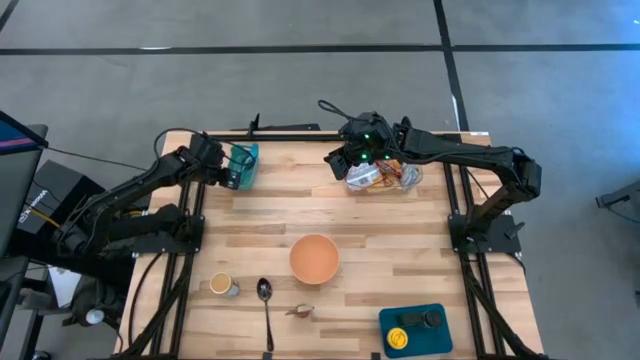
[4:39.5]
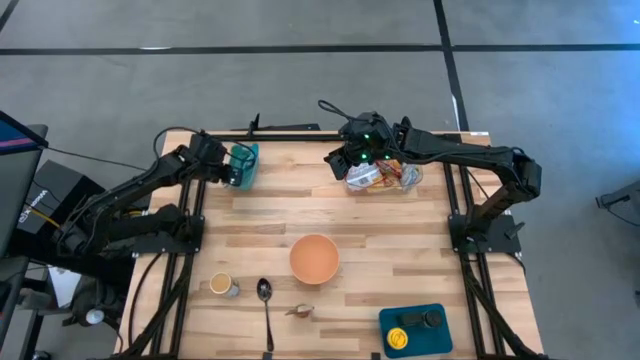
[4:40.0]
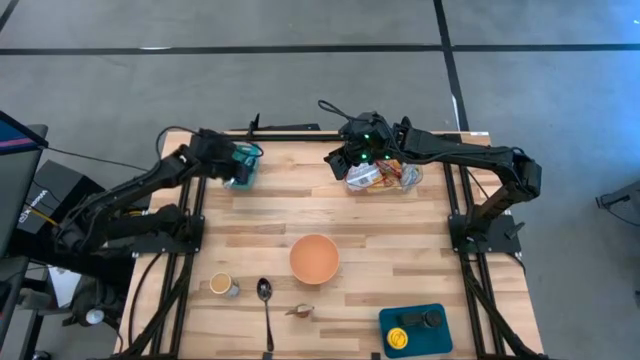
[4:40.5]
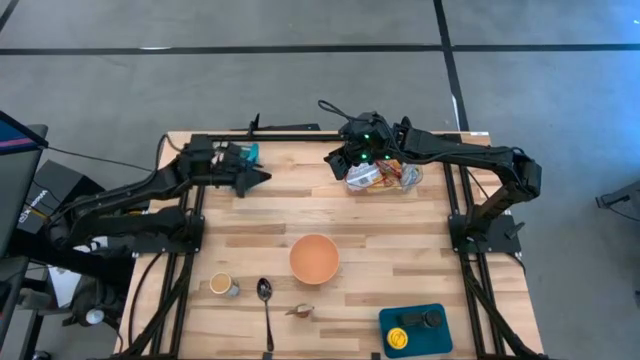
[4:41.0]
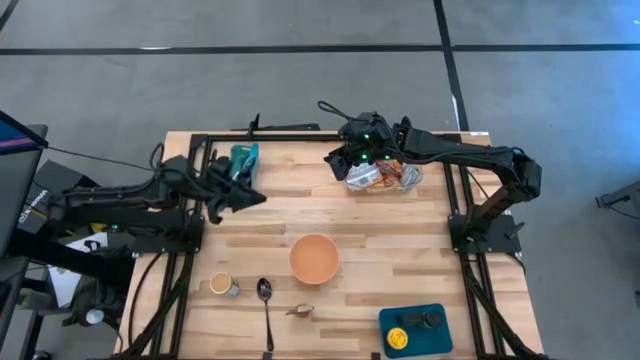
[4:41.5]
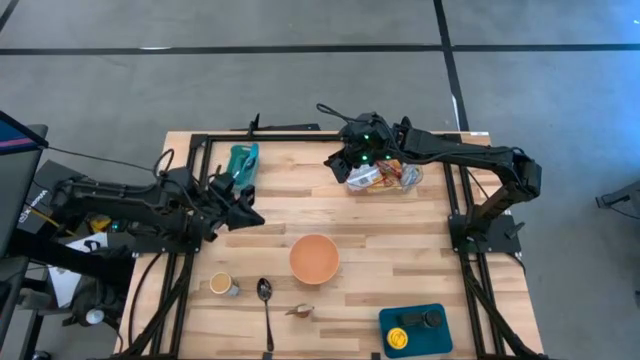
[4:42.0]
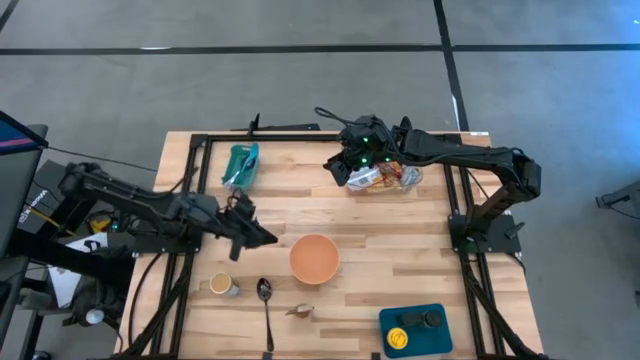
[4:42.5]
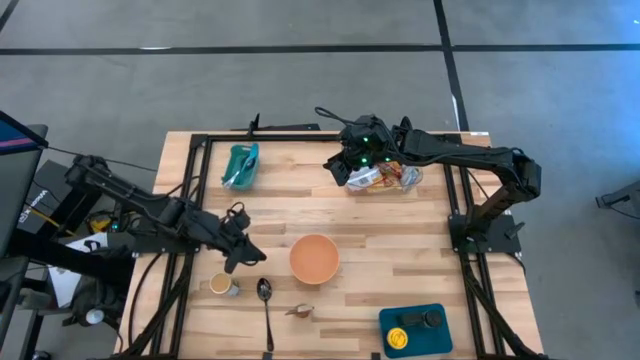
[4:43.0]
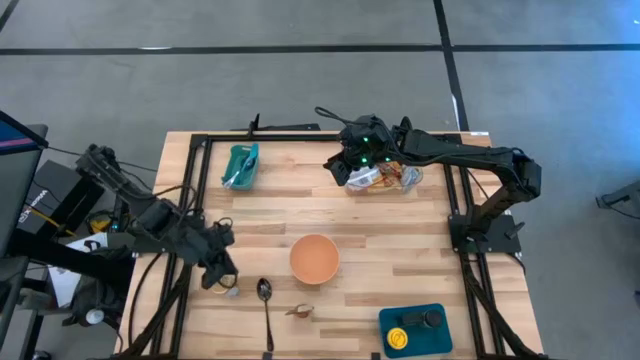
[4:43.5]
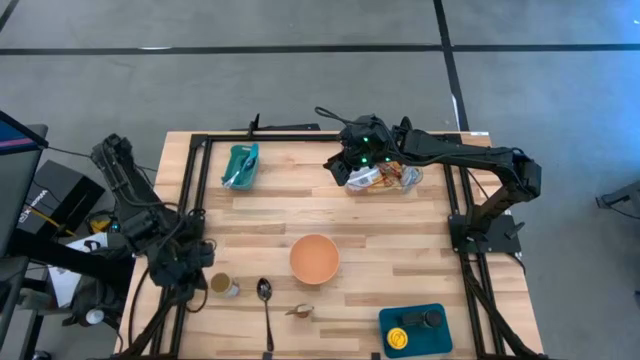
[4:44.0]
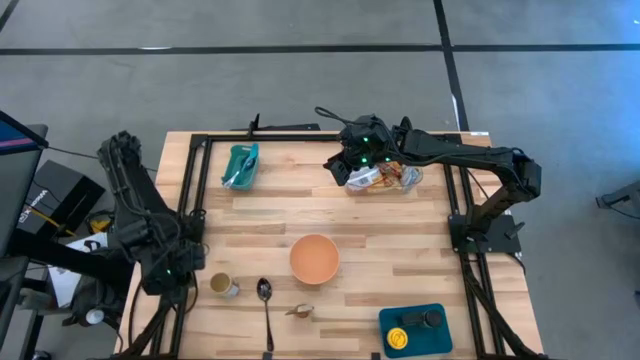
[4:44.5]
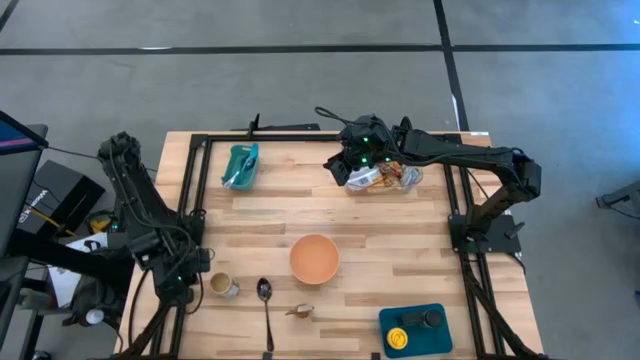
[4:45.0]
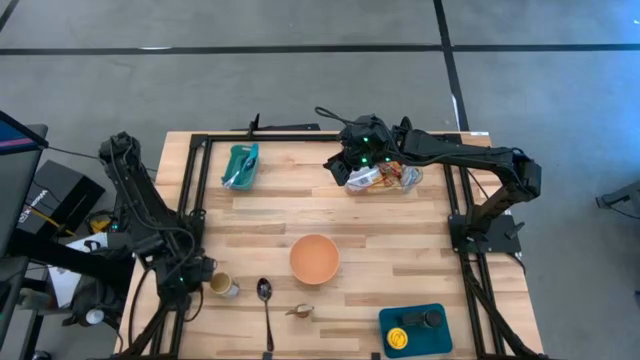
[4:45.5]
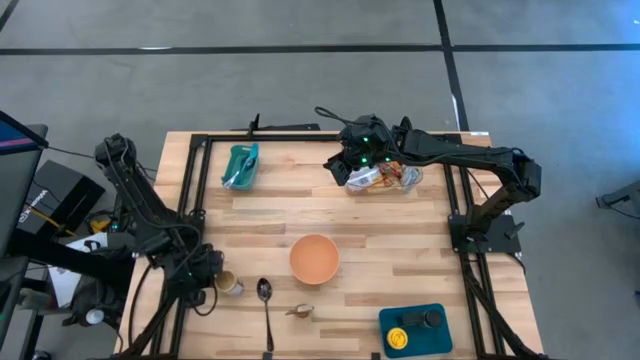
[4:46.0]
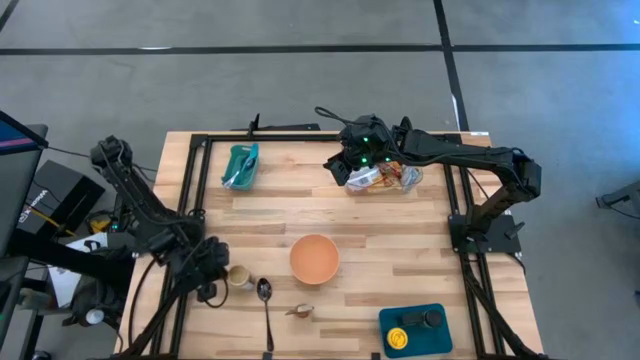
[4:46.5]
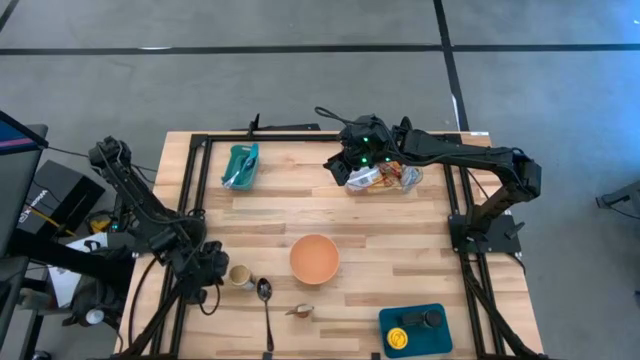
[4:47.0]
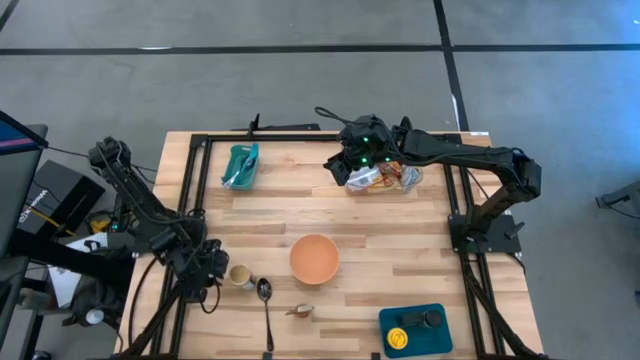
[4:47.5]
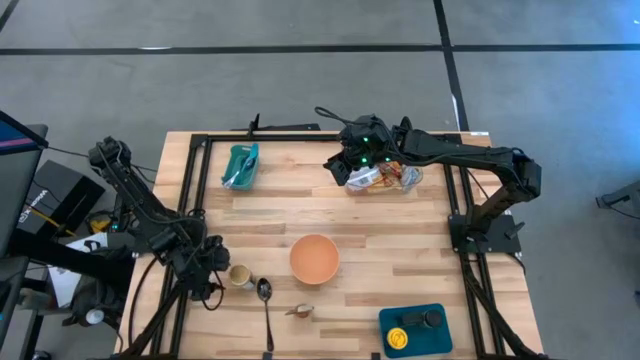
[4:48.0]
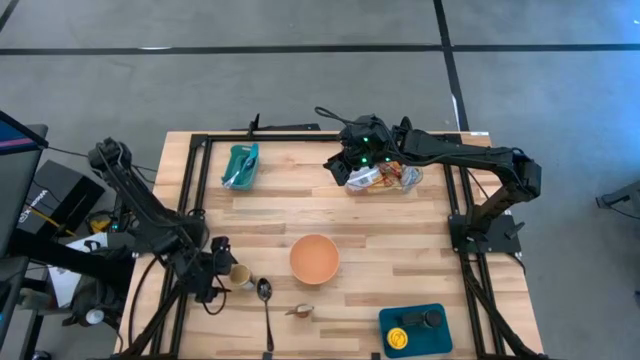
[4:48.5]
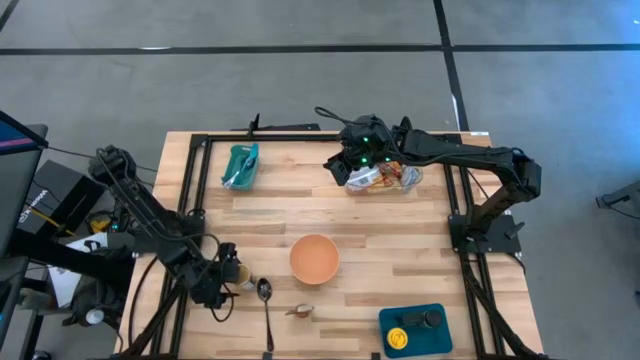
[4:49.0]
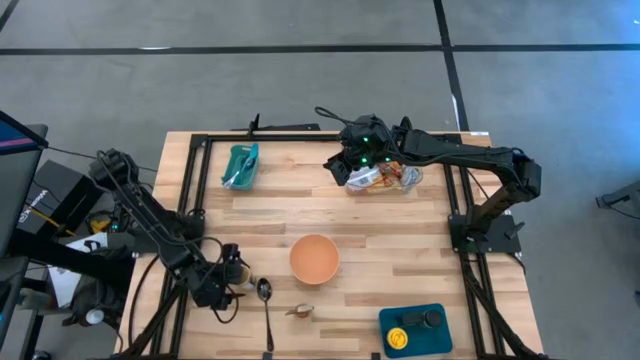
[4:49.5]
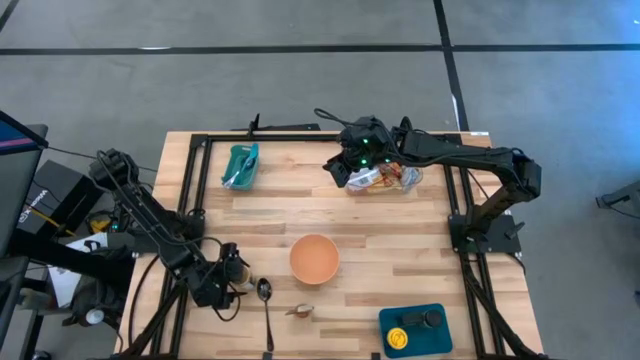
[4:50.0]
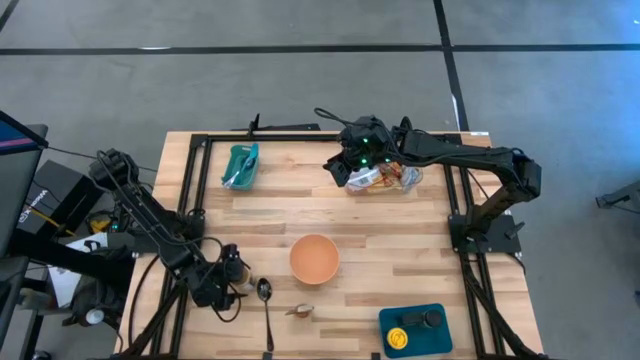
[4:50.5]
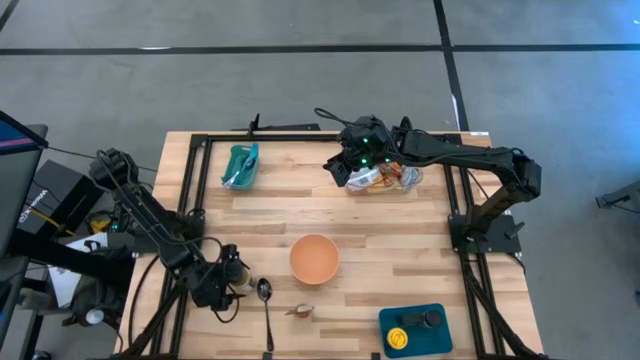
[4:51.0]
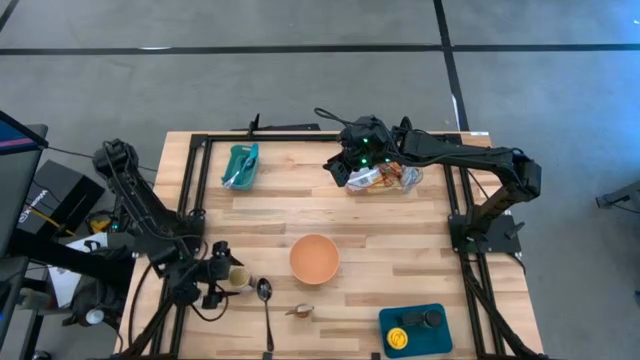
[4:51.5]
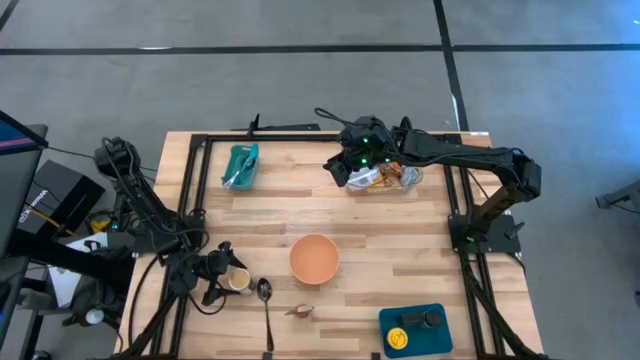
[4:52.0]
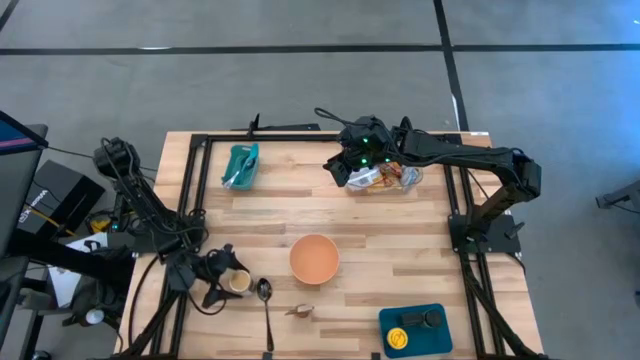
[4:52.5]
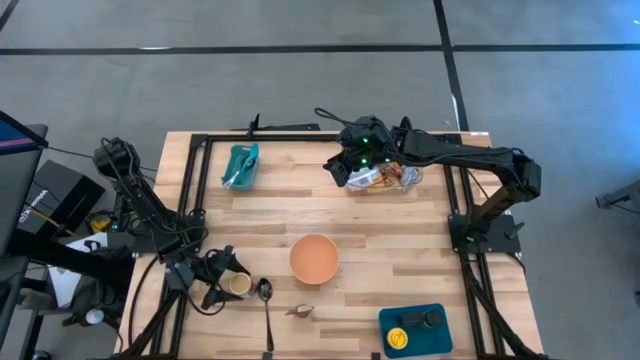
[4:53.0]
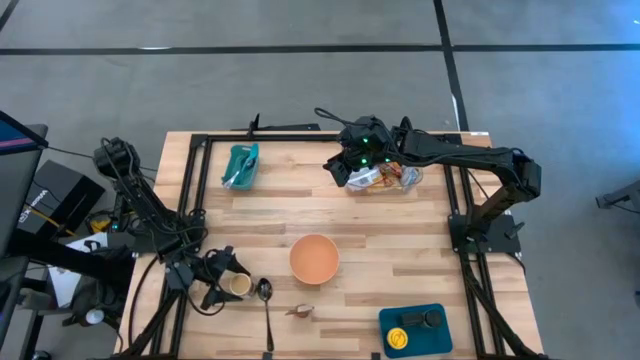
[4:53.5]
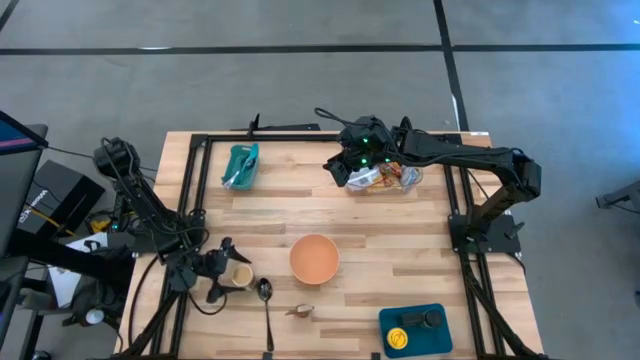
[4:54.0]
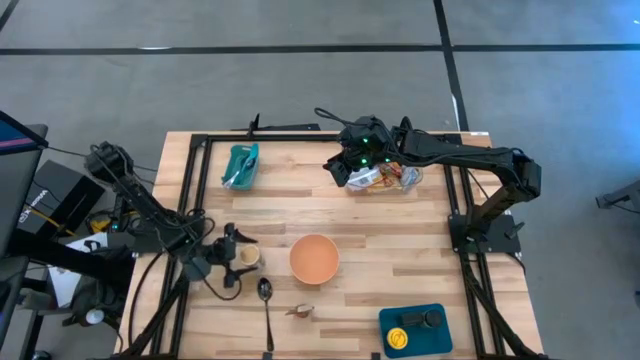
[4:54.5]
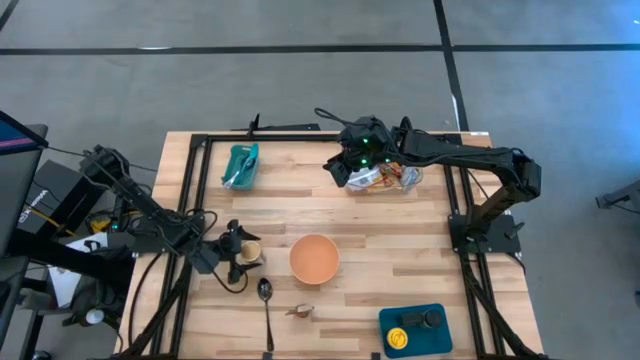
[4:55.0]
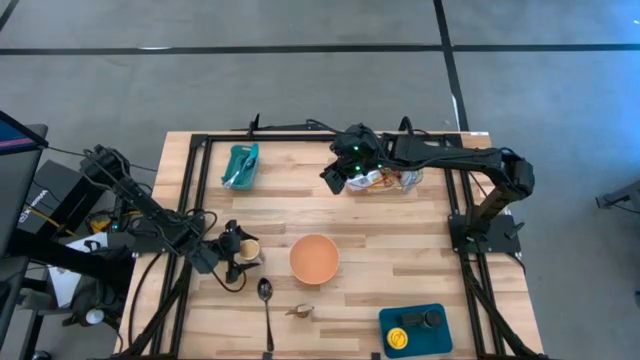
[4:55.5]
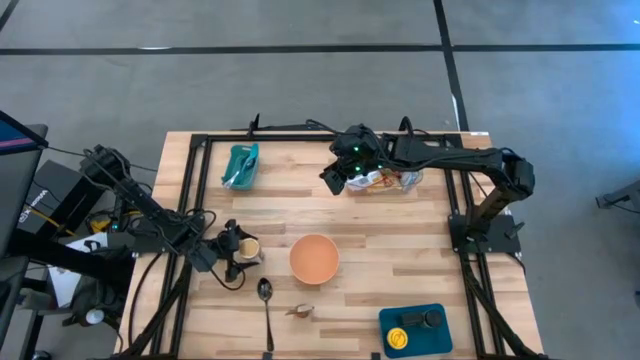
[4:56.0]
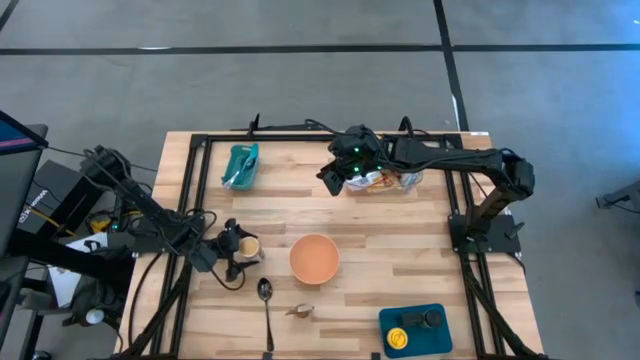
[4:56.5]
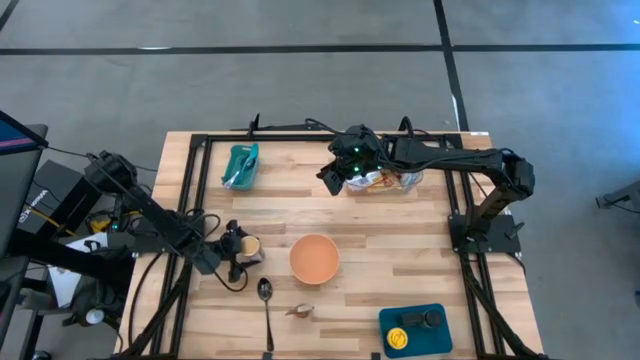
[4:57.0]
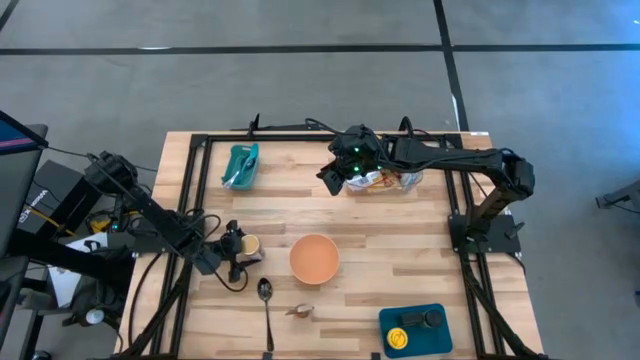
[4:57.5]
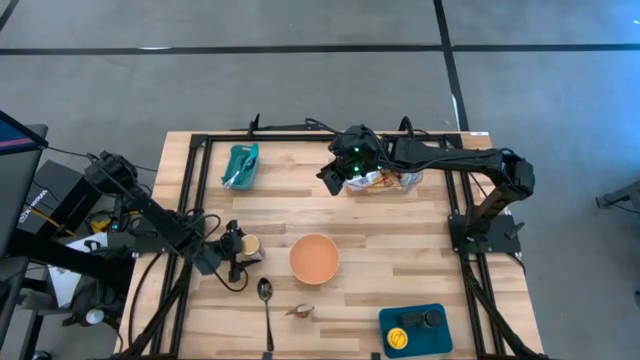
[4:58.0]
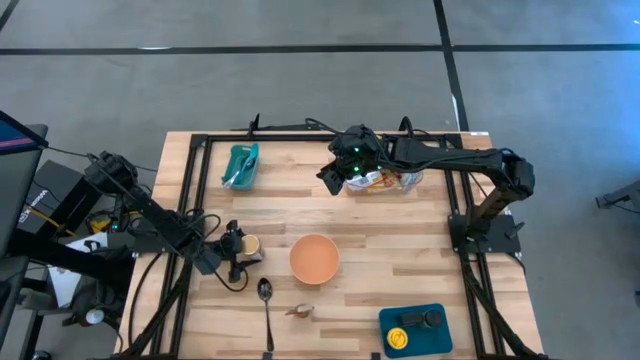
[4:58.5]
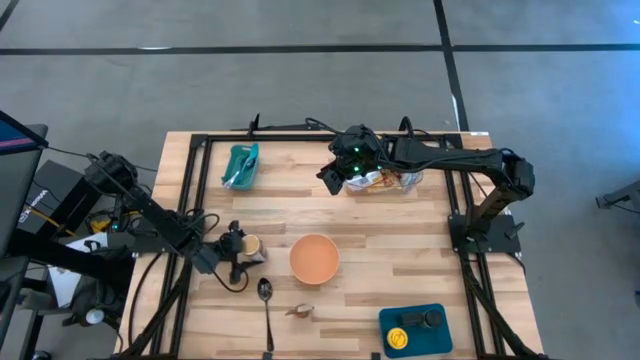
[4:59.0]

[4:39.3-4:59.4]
Task: Pick & Place Food Item
Put the golden seasoning bottle into the dark blue bin

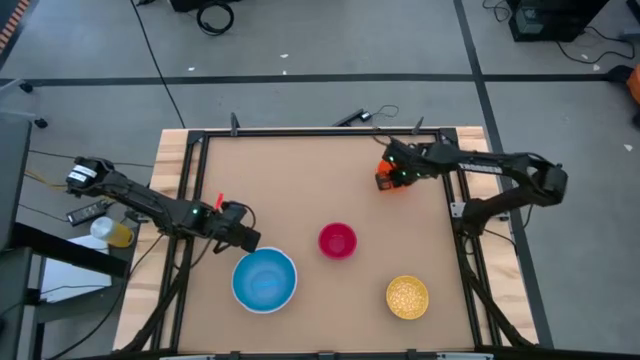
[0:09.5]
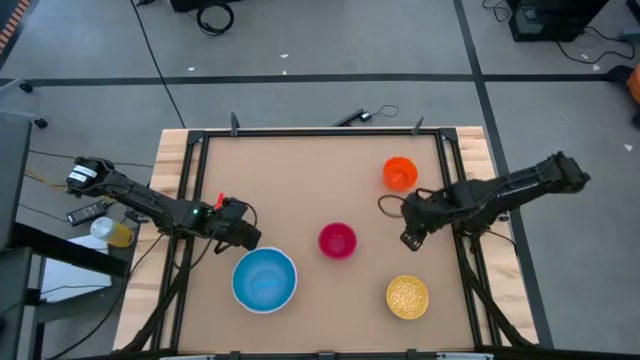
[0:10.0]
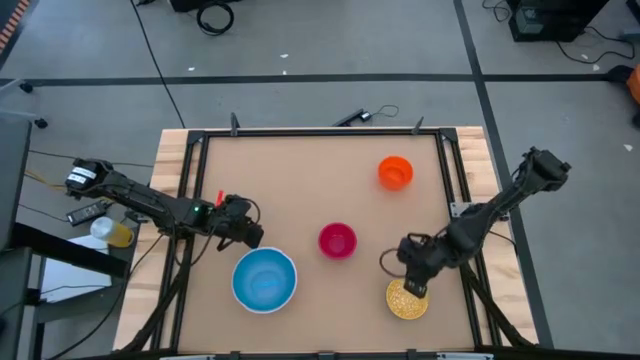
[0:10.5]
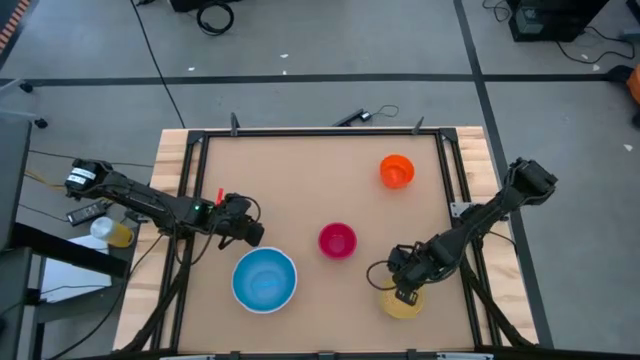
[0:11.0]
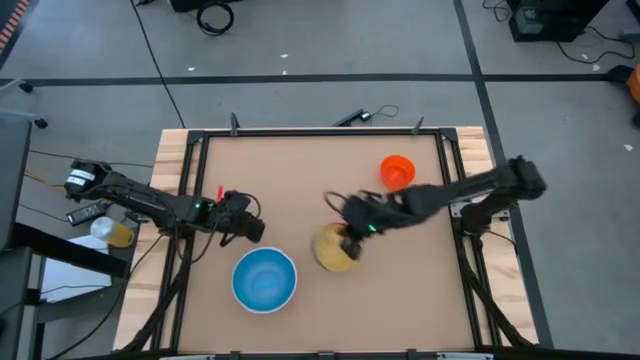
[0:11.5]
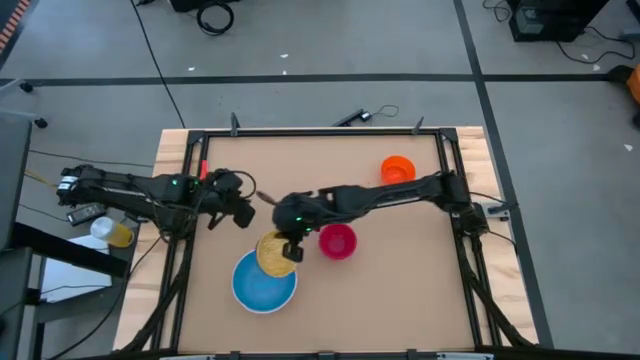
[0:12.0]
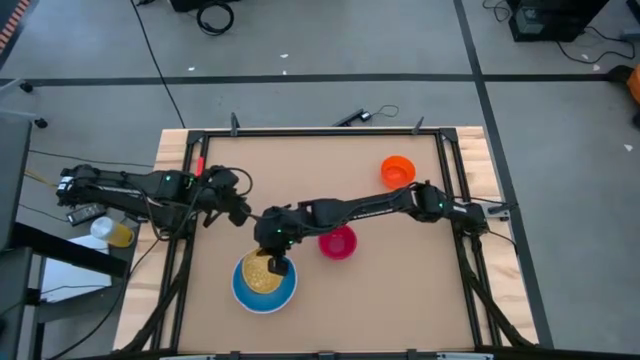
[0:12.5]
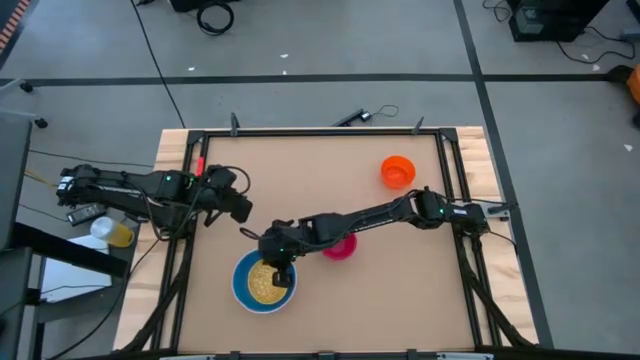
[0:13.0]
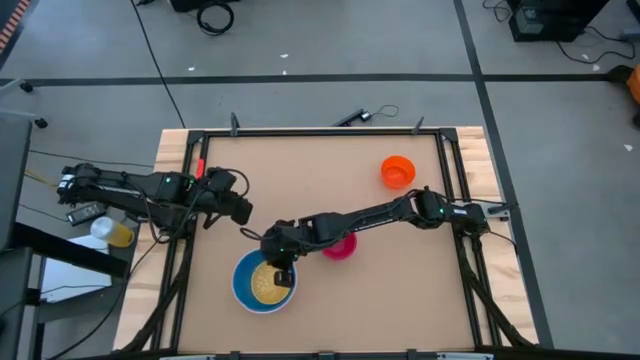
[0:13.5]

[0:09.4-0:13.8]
Task: Nest bowls inside each other by size order
Stack the yellow bowl on top of the blue bowl
